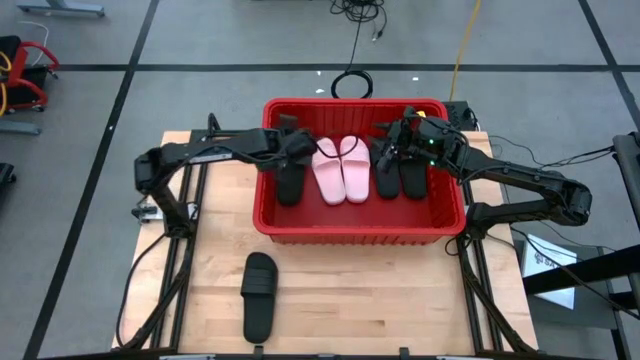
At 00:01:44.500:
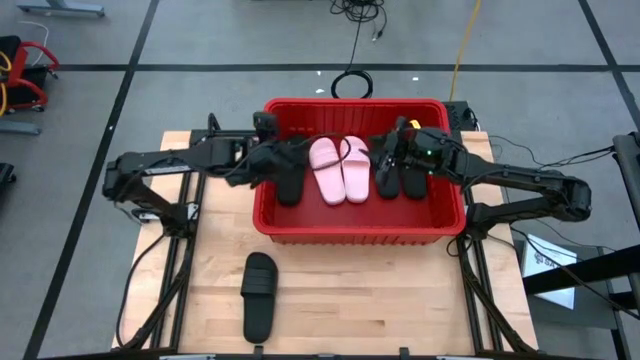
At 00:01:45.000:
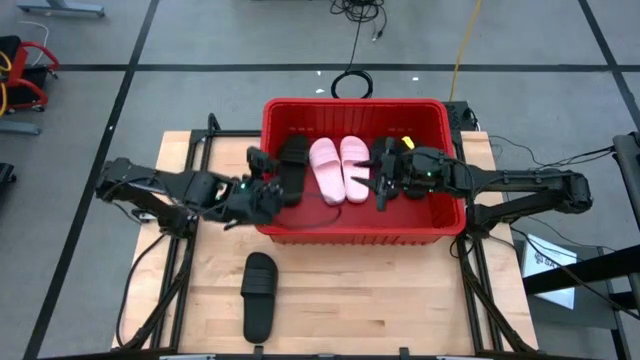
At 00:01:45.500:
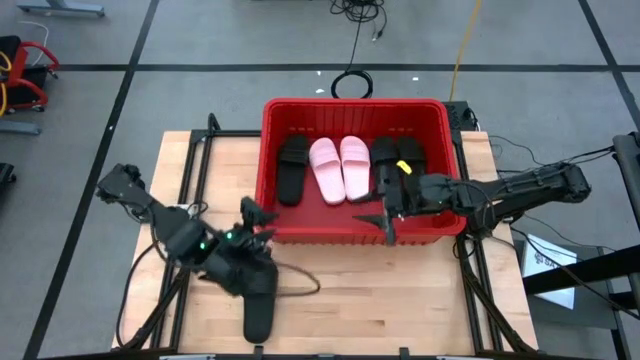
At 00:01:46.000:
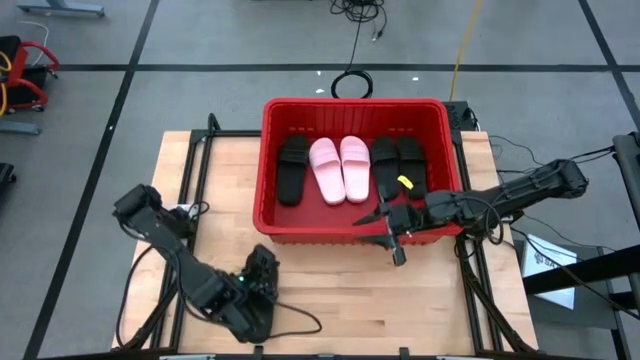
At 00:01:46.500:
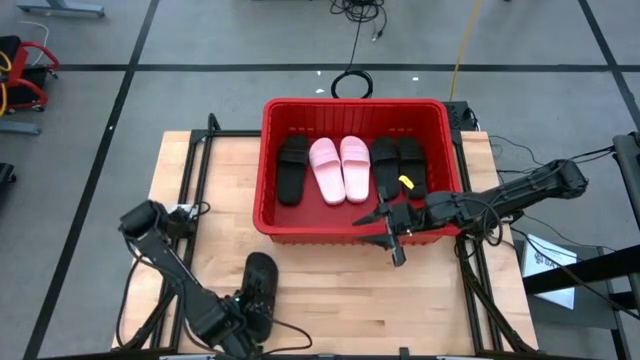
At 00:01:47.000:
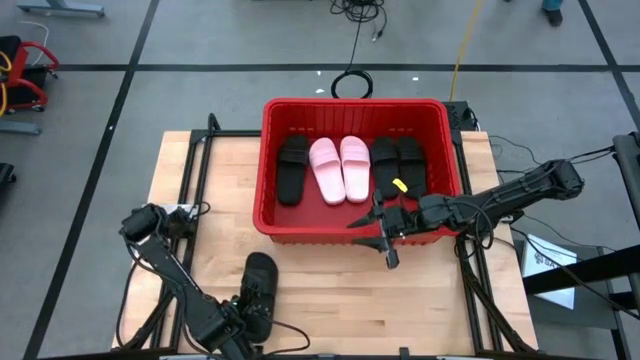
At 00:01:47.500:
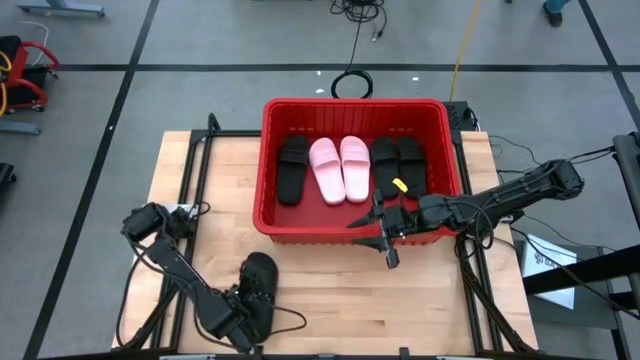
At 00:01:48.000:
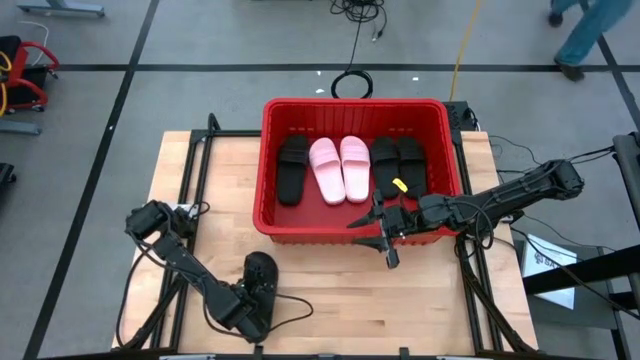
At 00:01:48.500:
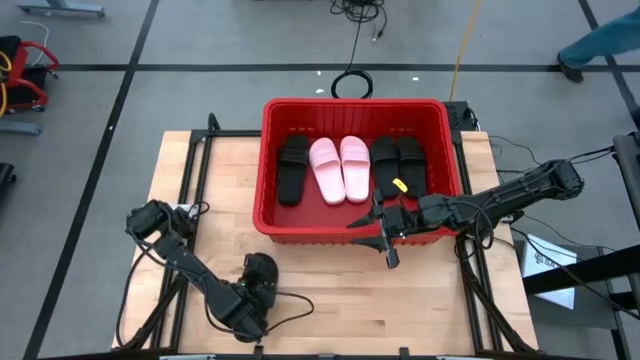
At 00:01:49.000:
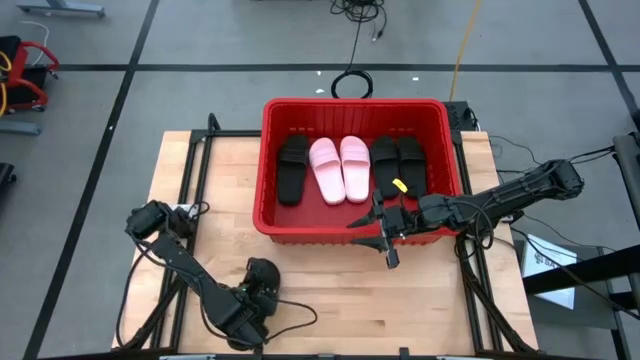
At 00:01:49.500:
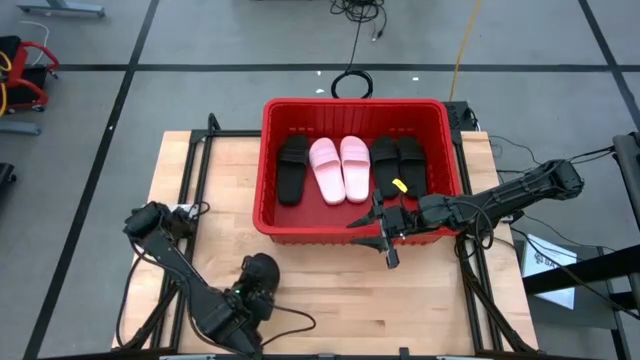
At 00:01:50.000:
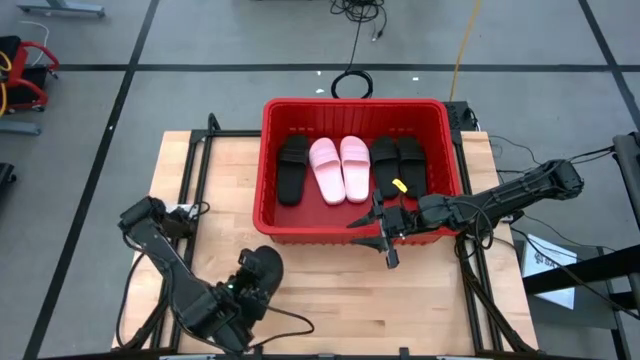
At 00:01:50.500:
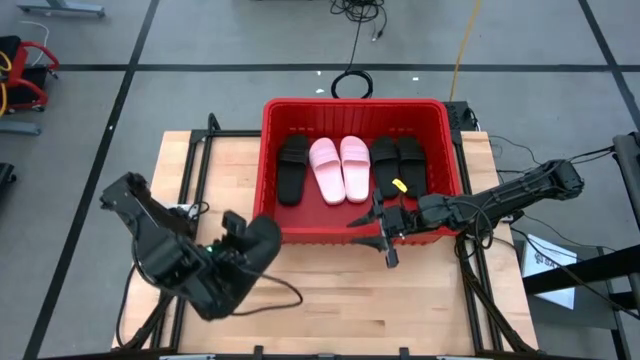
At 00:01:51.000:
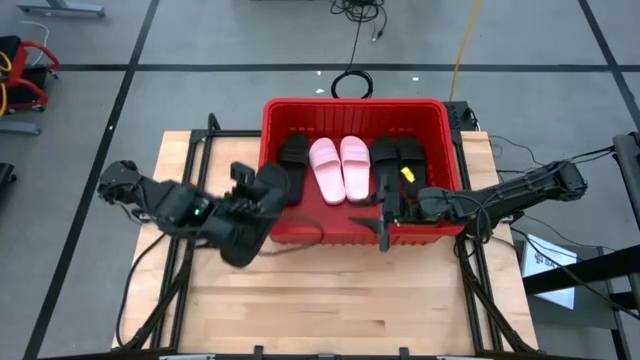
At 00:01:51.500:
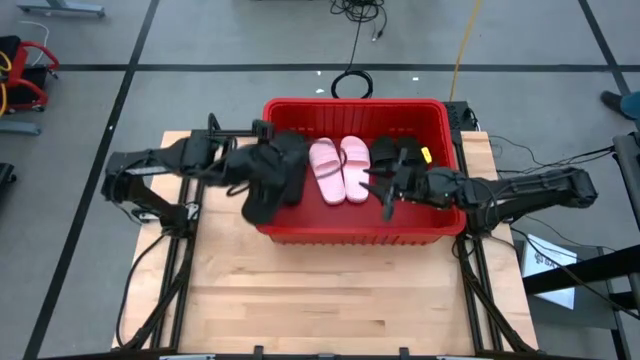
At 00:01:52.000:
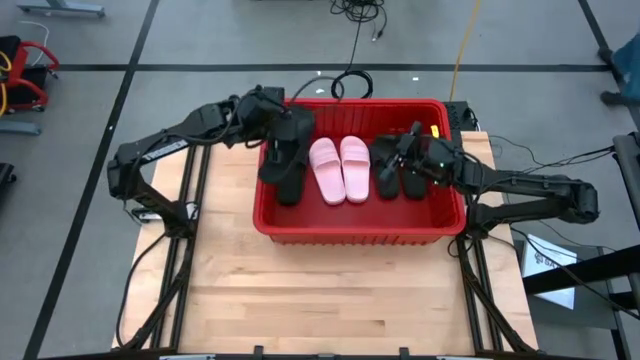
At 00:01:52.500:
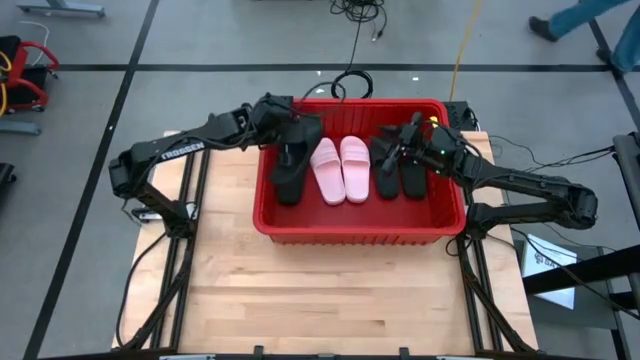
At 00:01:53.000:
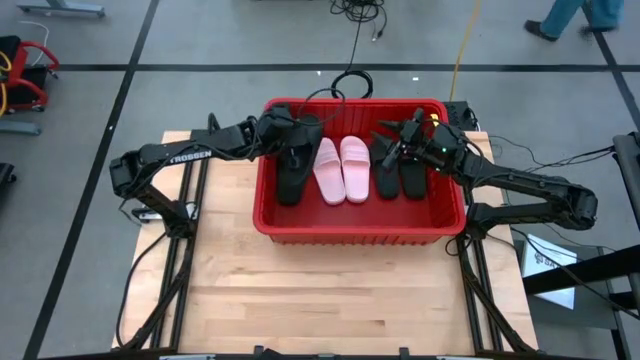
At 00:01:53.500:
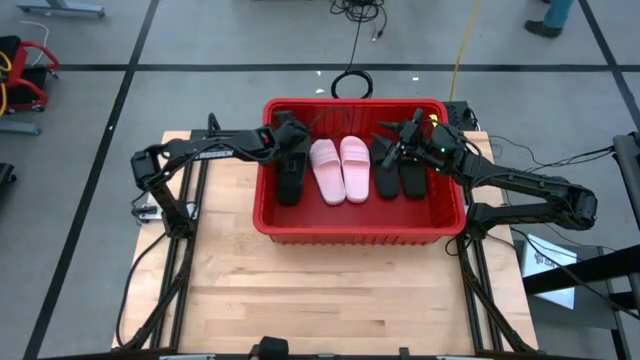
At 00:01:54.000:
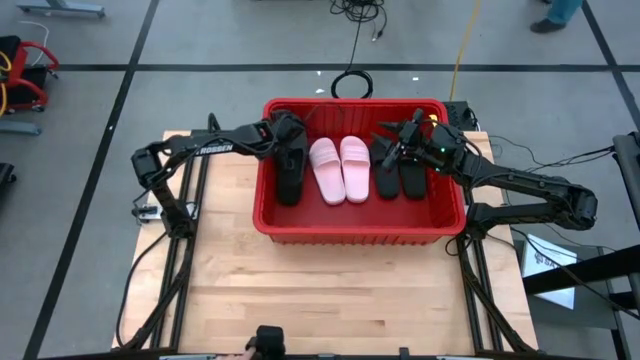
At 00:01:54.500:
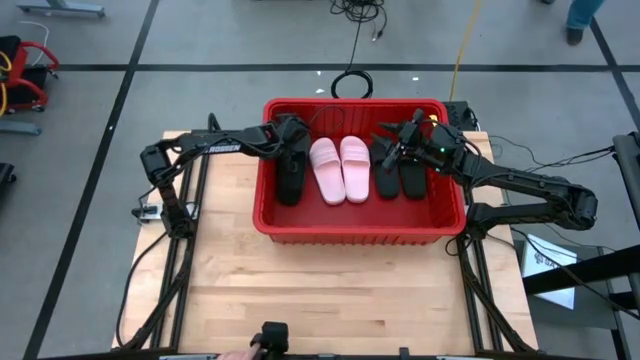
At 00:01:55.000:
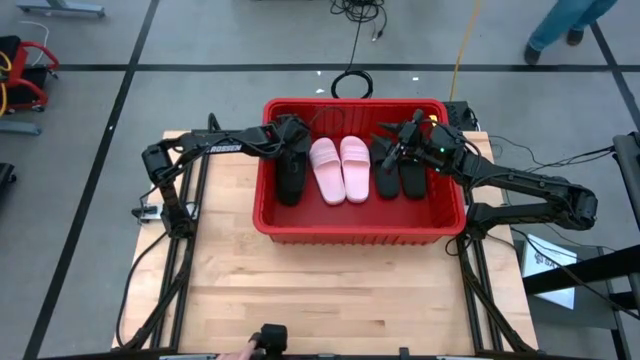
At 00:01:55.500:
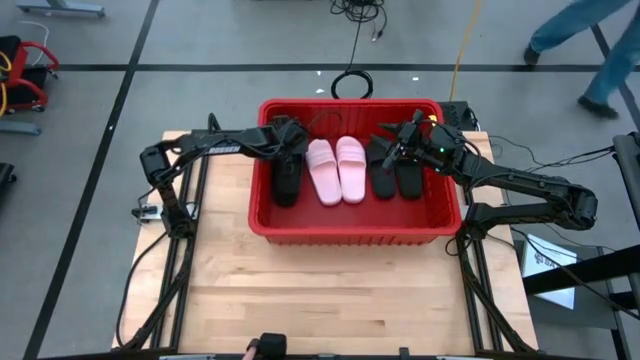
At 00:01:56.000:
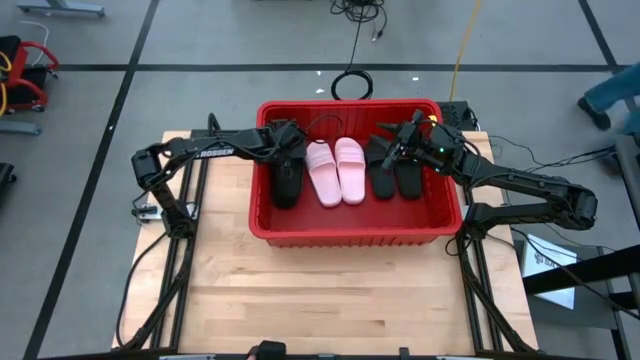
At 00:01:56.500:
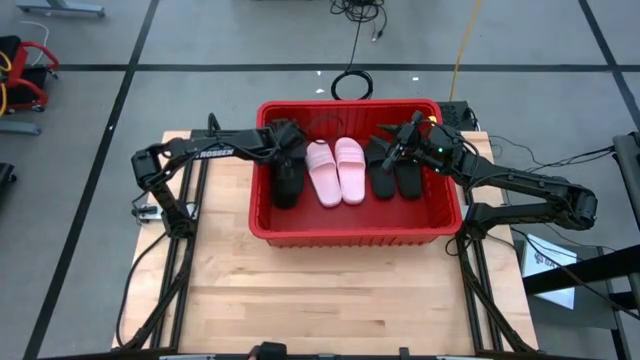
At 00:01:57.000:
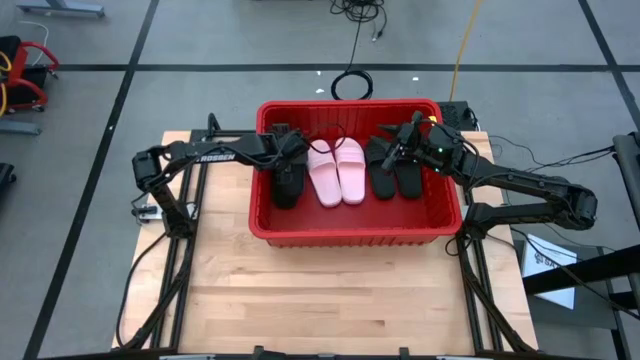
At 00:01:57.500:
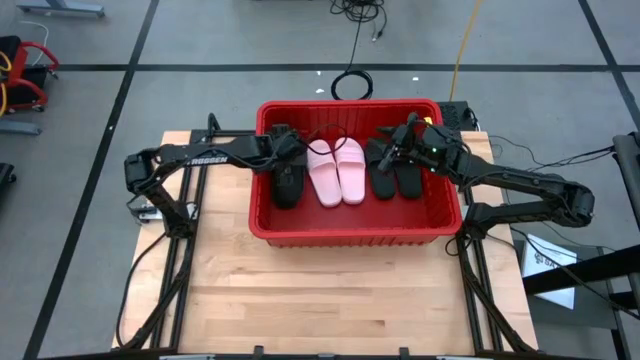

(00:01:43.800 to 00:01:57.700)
Task: Pick and place slides into bin
Put the black slide into the red bin

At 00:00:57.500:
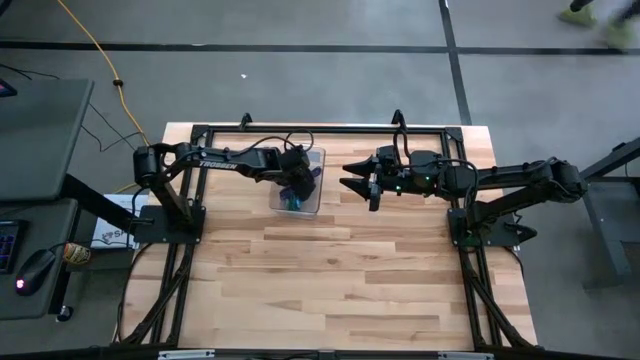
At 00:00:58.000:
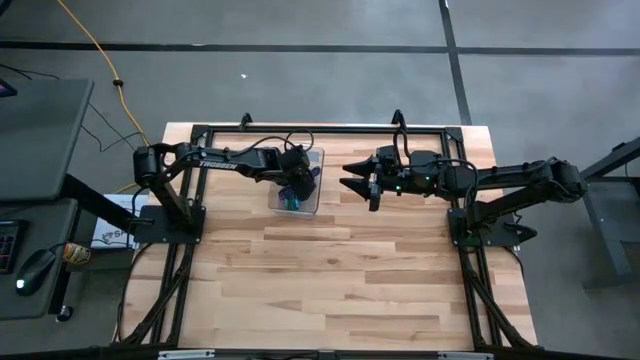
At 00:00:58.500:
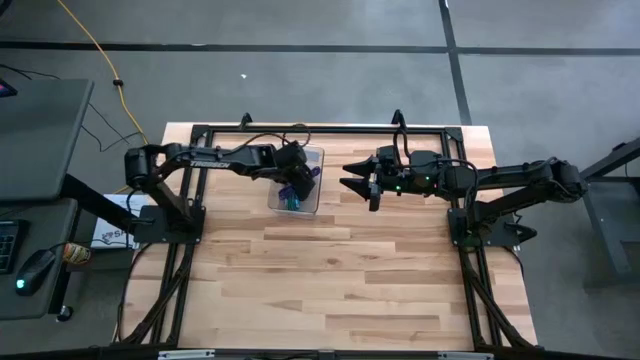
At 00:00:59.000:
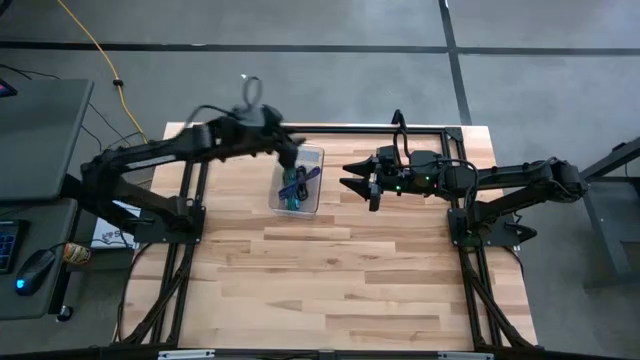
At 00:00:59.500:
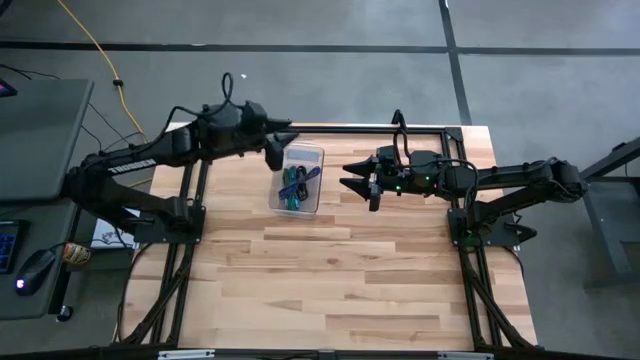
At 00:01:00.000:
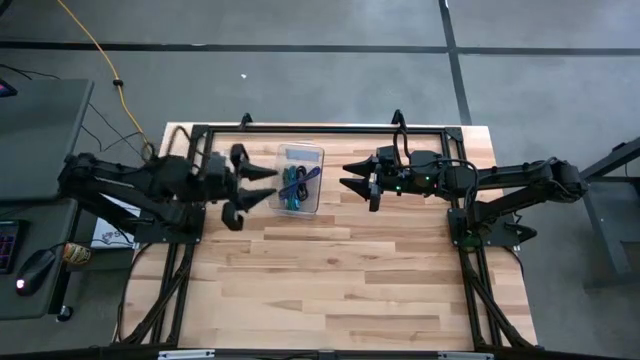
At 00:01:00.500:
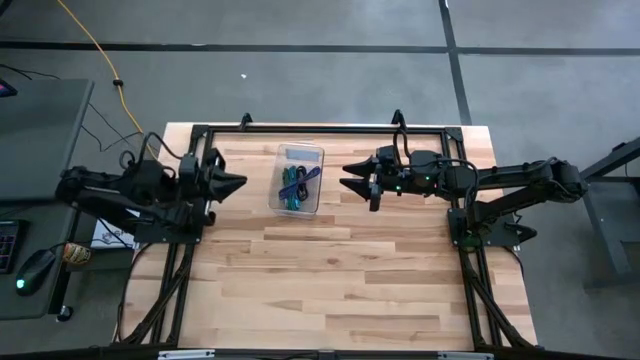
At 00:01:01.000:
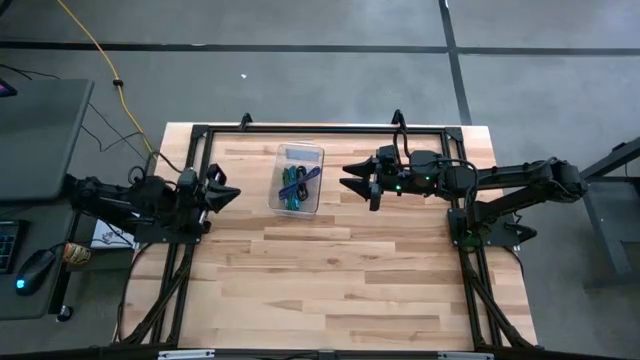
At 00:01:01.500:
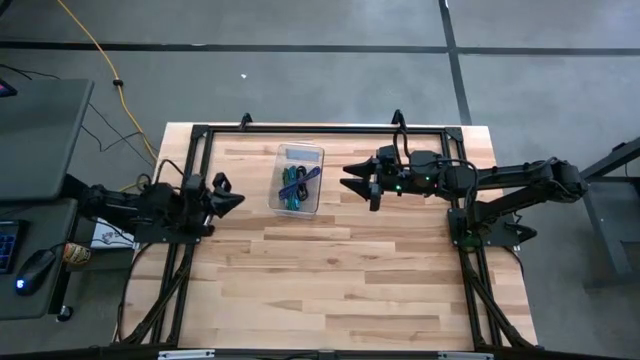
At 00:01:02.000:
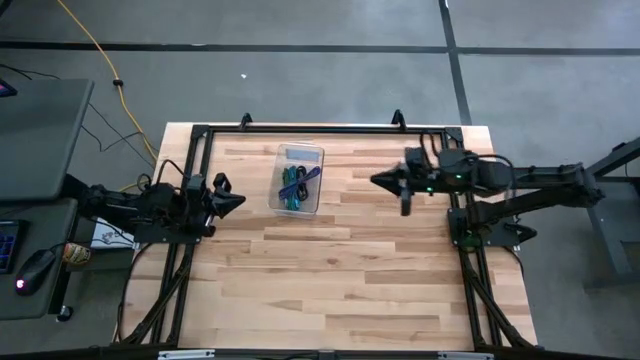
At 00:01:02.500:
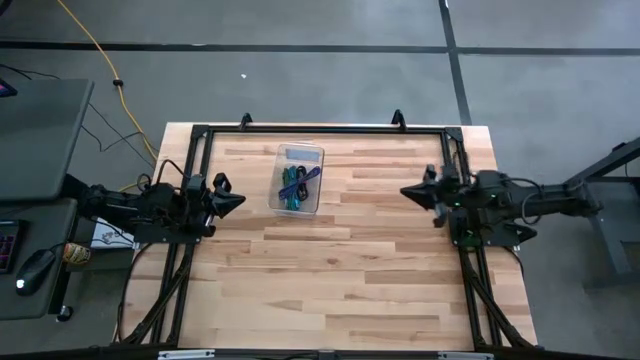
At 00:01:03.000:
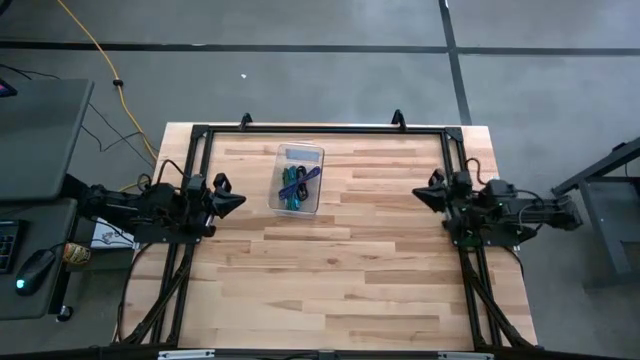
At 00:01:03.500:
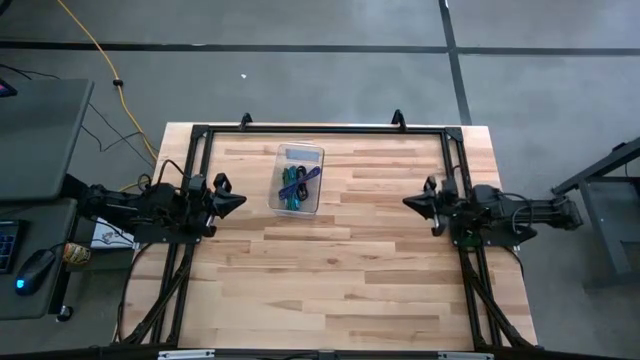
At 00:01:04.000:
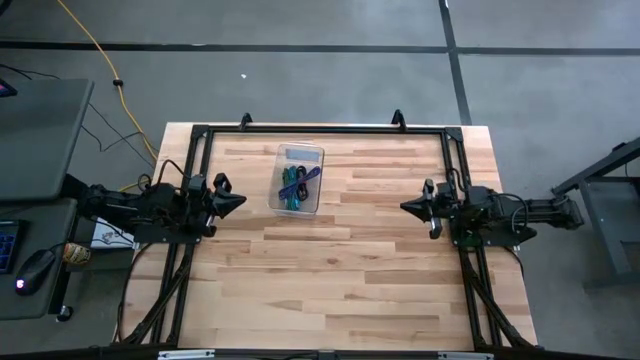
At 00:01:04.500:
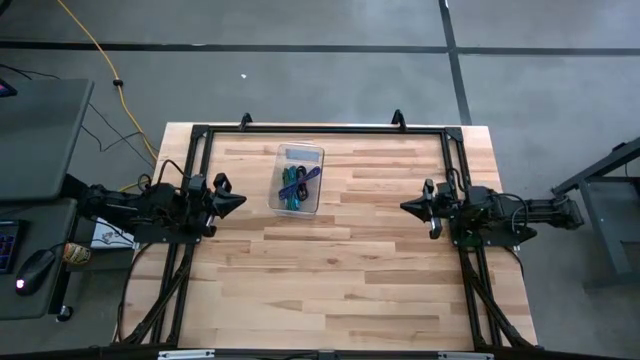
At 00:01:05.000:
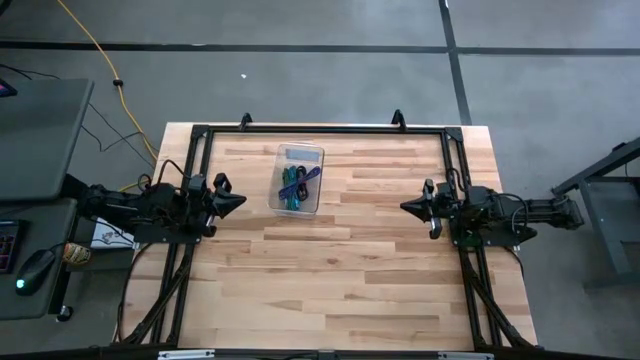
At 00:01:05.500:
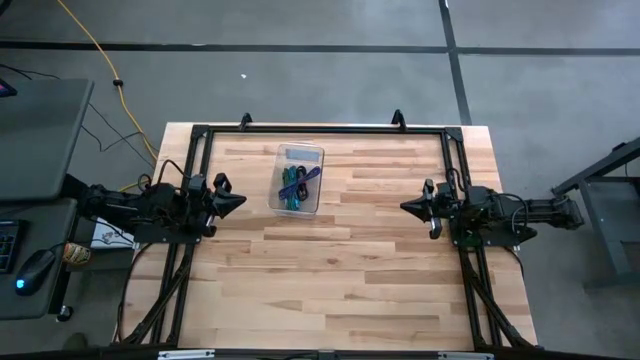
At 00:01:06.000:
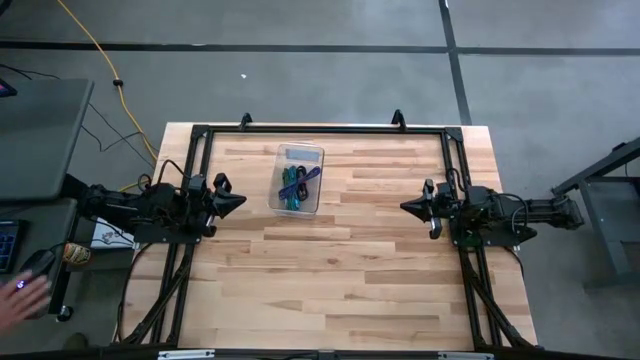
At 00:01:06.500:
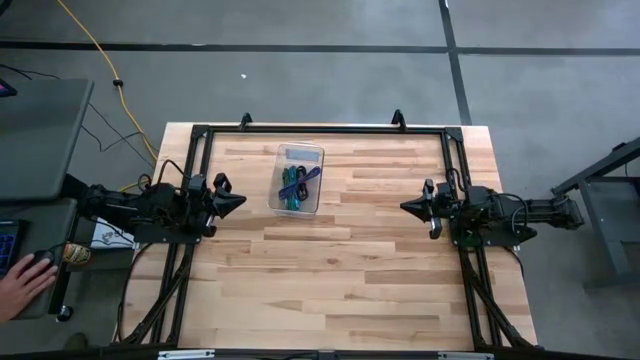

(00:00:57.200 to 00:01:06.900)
Task: Pick and place USB-C Cables
Return to Home Position
